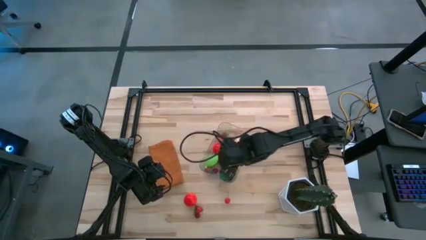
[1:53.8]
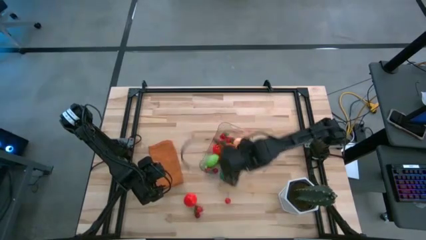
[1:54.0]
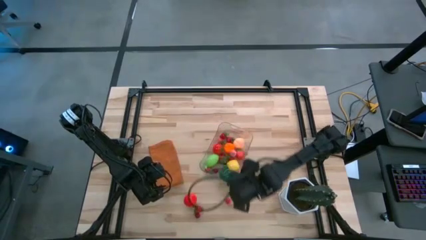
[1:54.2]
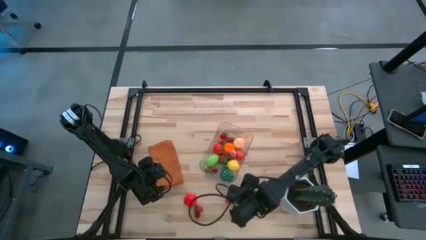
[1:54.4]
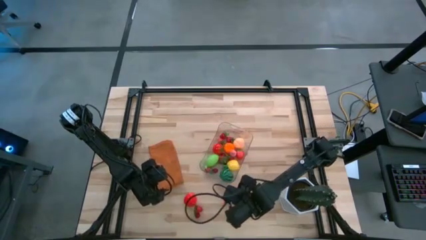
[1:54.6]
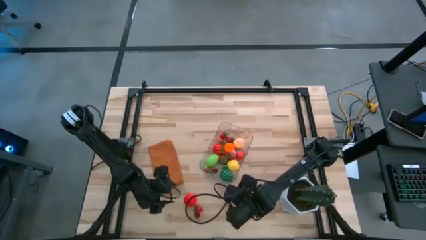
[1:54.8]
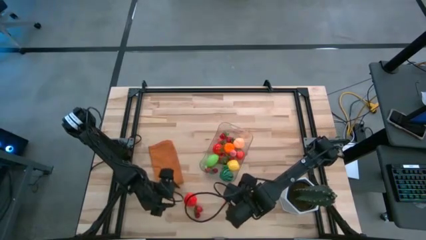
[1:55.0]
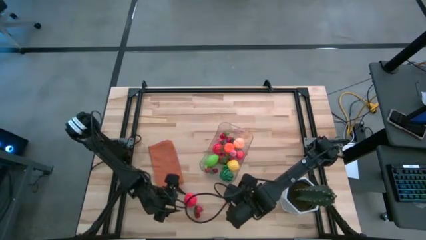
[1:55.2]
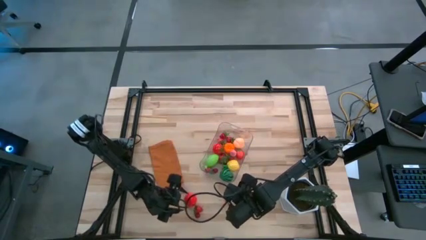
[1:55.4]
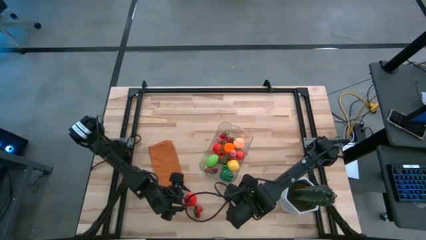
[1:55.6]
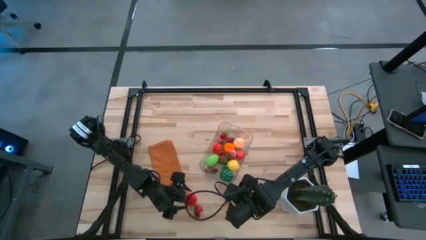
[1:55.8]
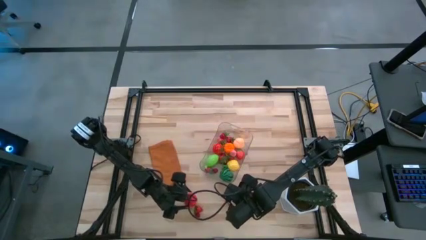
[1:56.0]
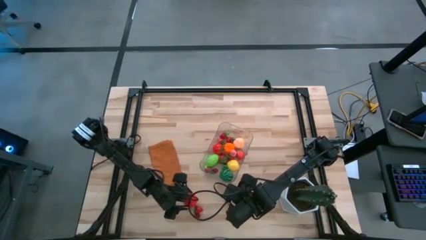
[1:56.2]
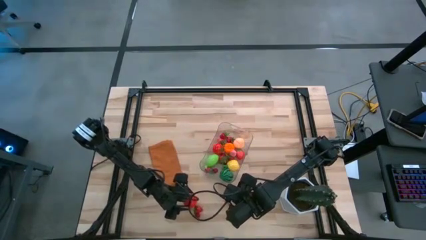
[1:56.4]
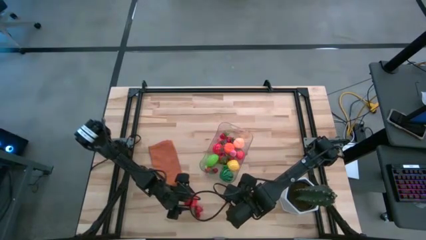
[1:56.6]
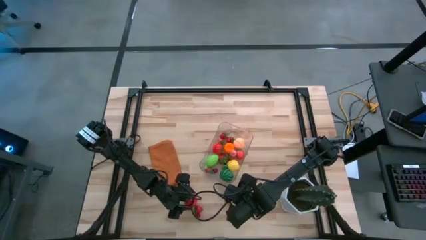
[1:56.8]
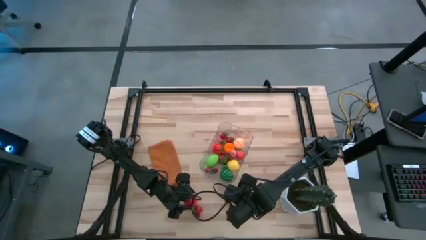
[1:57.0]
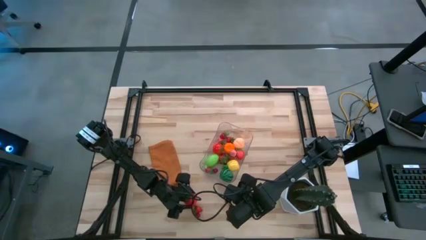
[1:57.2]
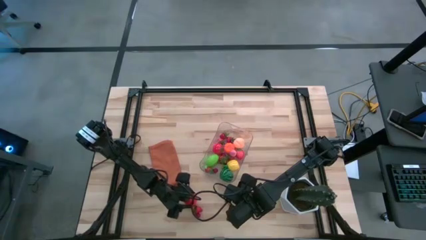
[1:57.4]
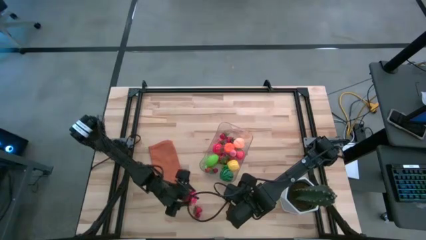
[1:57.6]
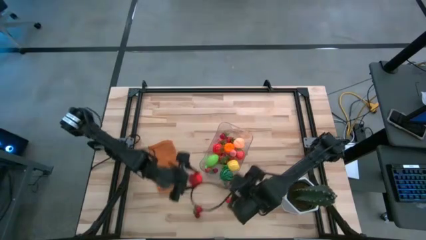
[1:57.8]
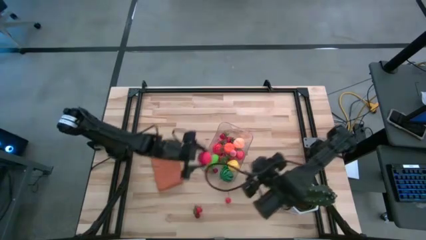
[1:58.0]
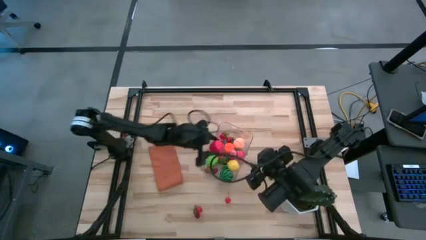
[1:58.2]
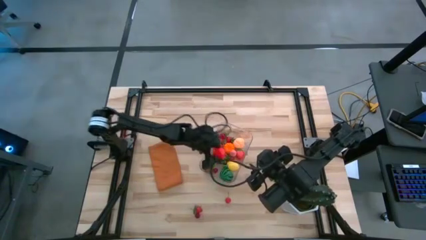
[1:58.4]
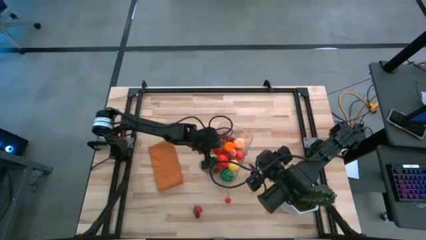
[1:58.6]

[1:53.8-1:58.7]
Task: Pick and placing Produce into tupperware
Put the red tomato into the transparent bin

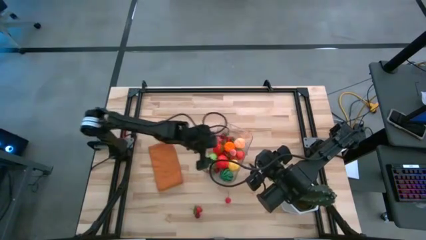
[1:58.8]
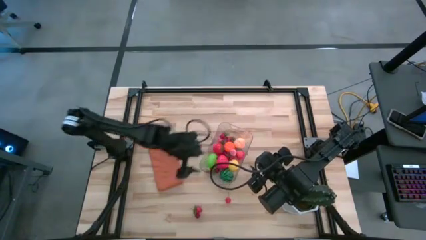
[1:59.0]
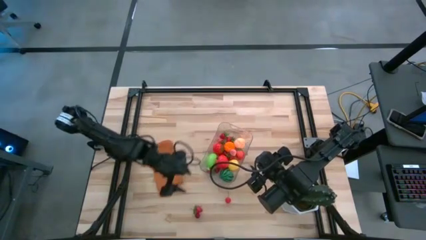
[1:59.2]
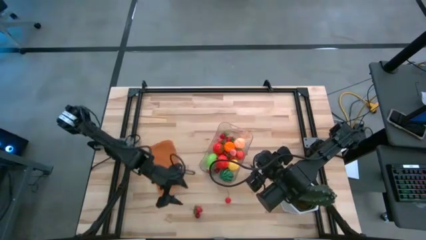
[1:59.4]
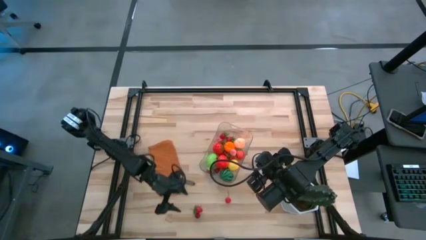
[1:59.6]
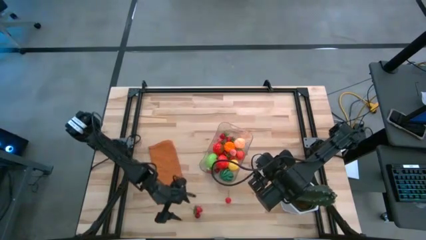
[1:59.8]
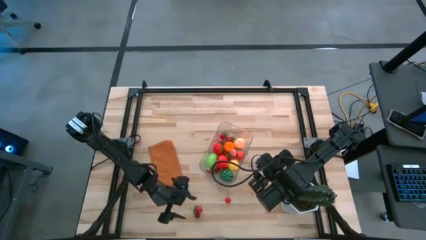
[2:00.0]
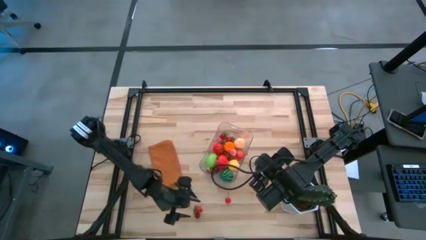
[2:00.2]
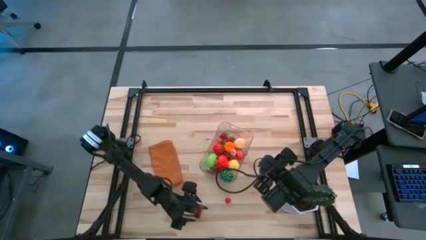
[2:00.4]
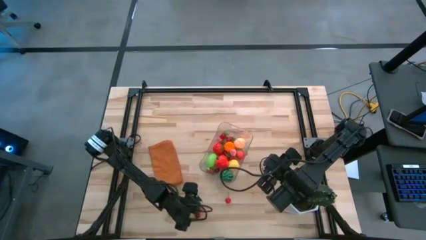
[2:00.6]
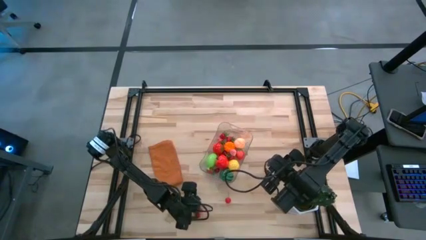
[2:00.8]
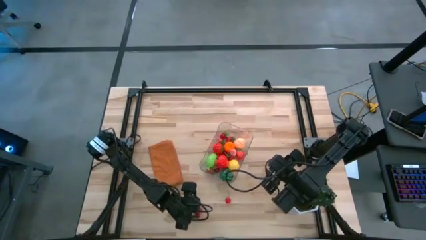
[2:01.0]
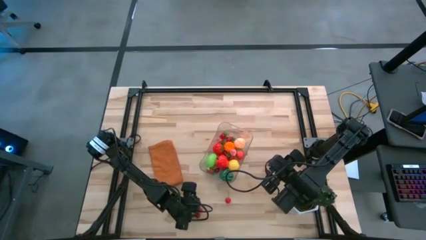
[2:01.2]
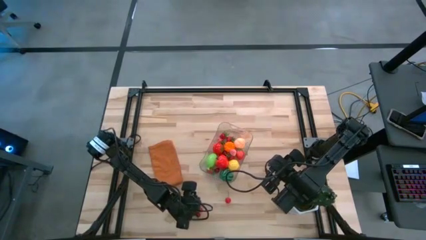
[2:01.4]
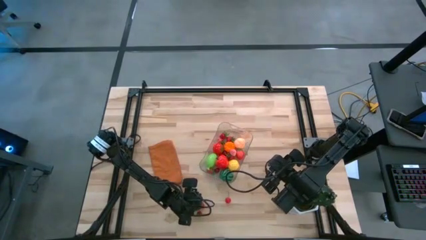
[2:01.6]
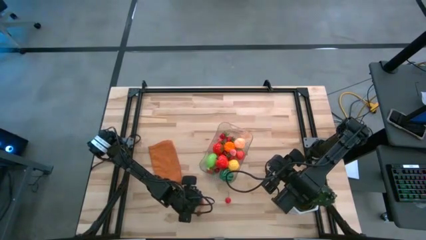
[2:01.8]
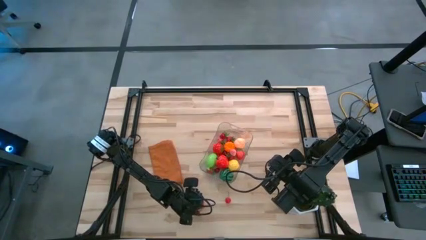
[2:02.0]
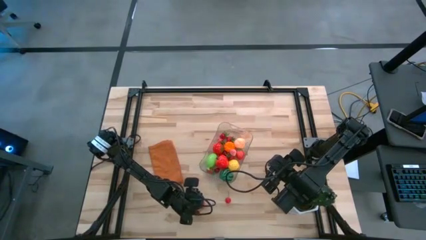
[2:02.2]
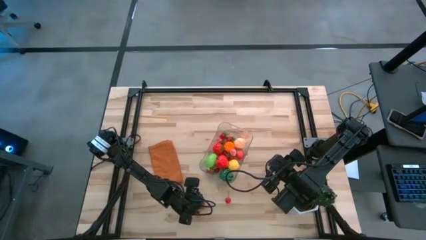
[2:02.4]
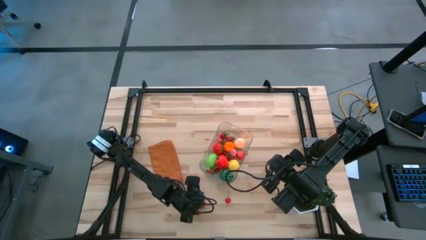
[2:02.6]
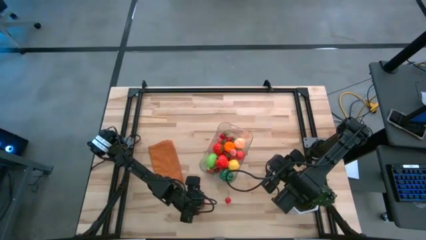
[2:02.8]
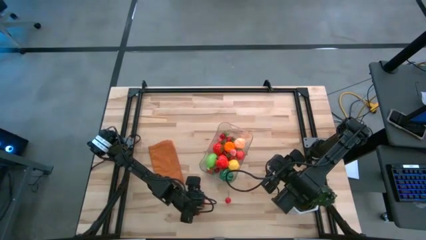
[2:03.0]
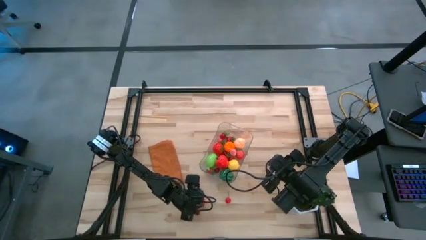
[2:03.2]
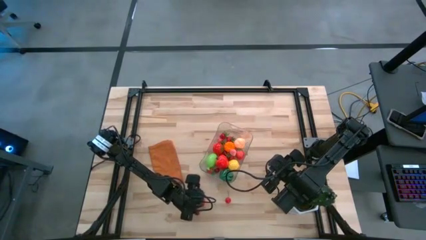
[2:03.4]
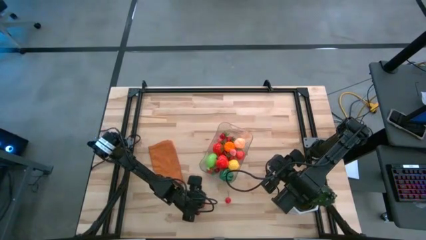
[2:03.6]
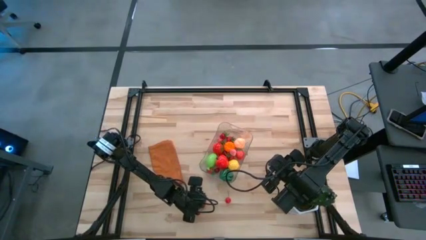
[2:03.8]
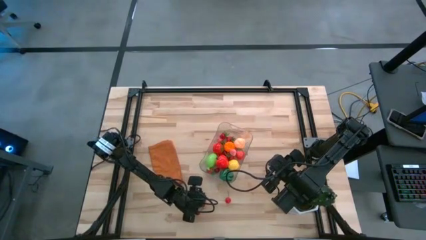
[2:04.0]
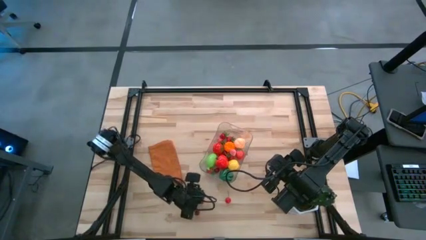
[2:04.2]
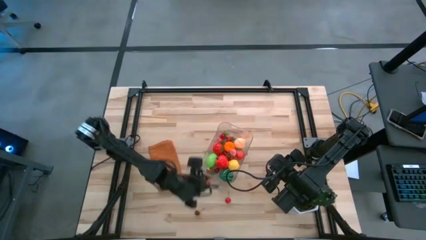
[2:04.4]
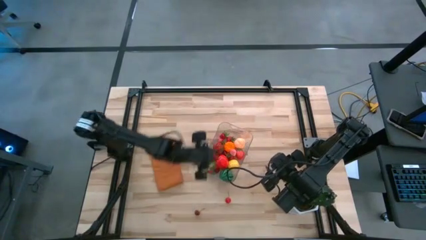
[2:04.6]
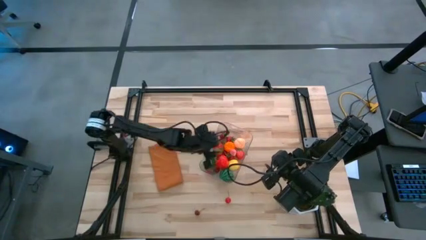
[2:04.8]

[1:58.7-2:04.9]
Put the red strawberry into the transparent bin

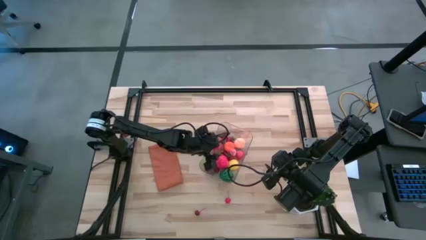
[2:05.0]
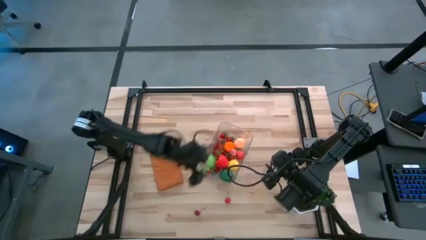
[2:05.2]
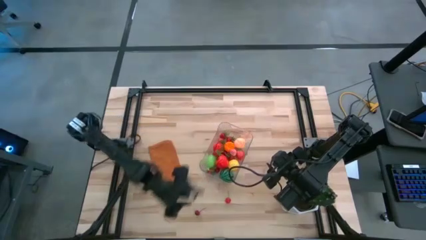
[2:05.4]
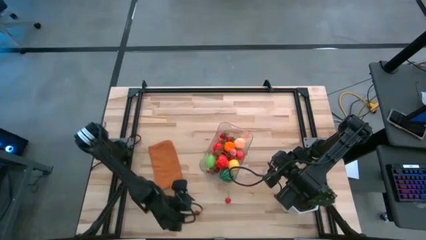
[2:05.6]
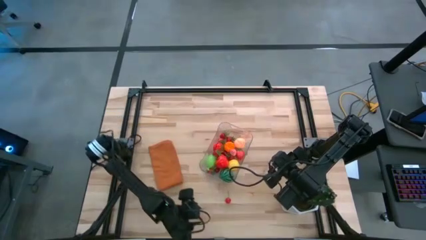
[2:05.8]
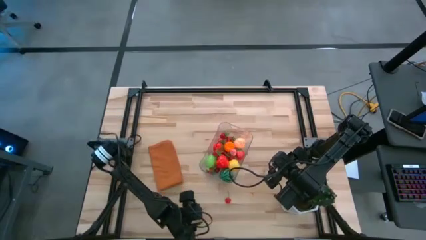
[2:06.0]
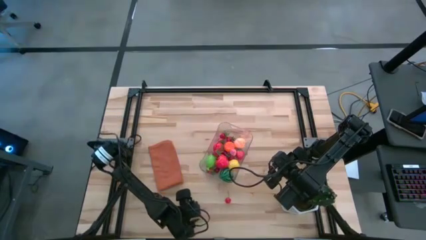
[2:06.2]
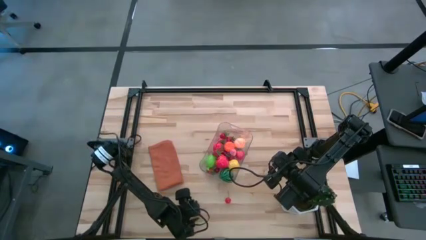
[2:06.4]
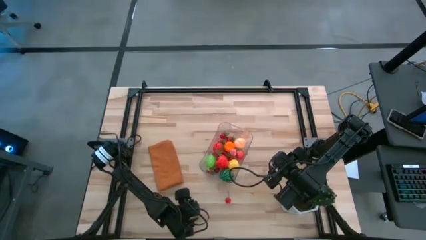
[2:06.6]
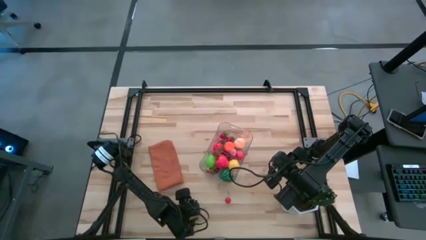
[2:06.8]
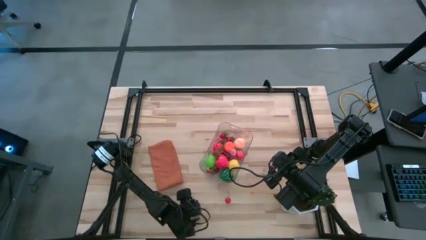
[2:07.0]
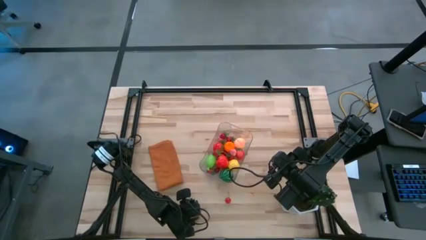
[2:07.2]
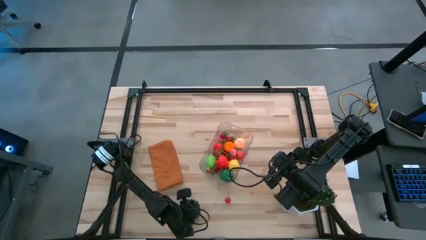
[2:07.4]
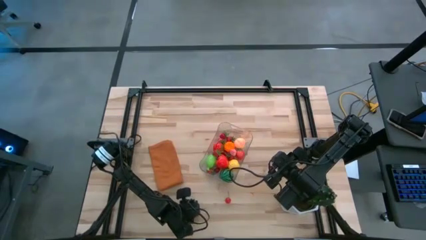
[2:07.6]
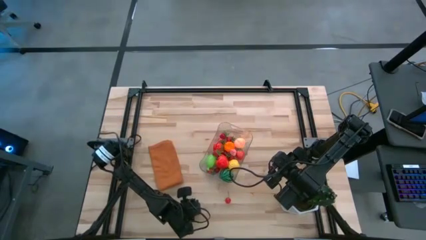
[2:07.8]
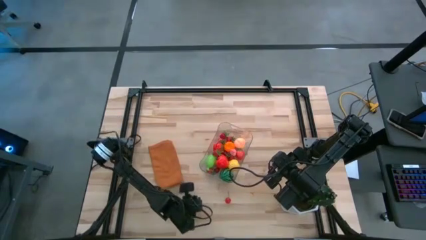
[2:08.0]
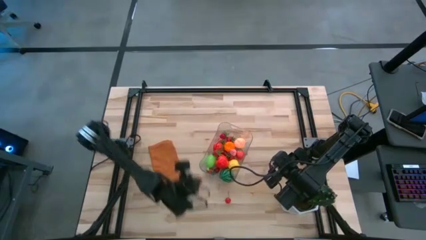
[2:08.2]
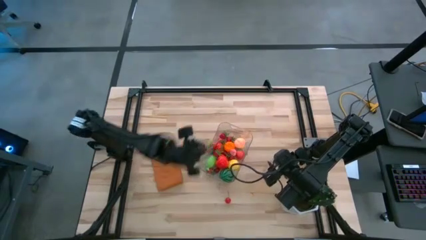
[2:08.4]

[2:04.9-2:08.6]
Put the red cherry into the transparent bin
